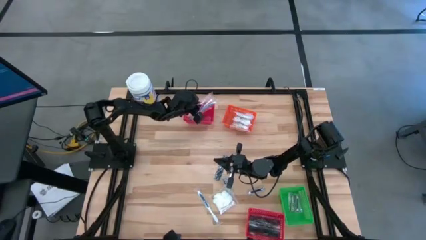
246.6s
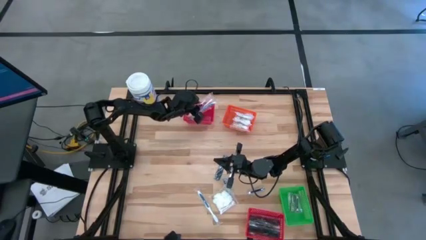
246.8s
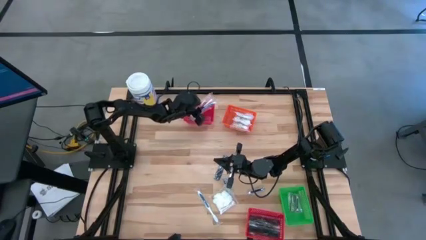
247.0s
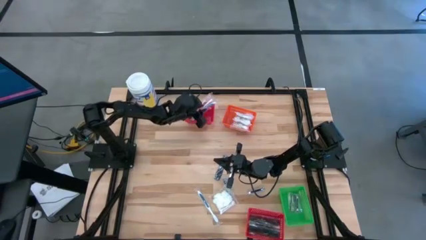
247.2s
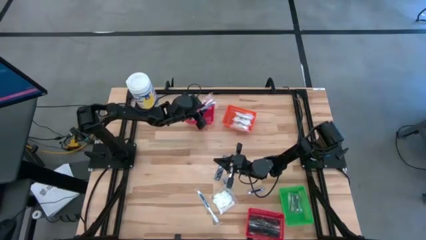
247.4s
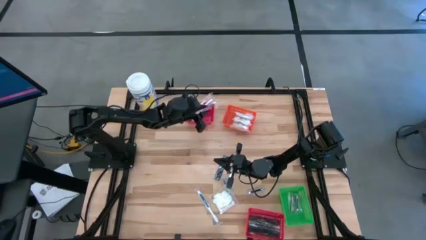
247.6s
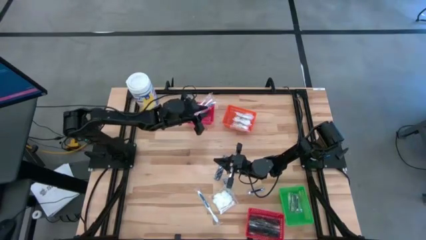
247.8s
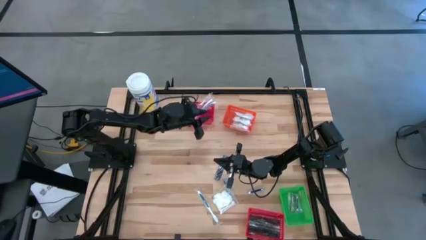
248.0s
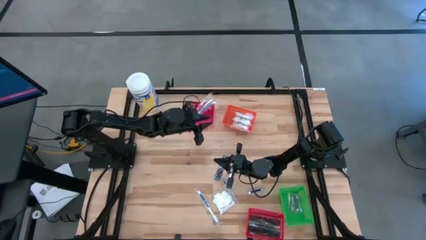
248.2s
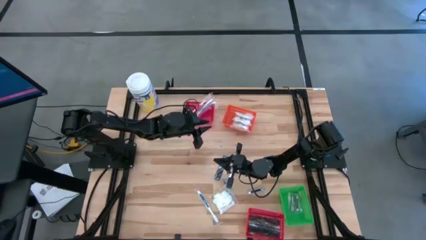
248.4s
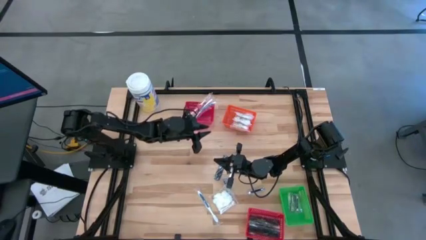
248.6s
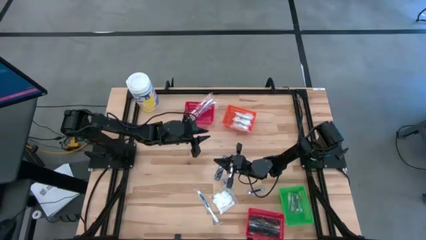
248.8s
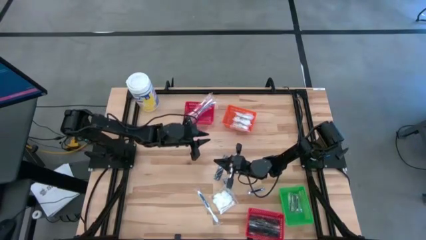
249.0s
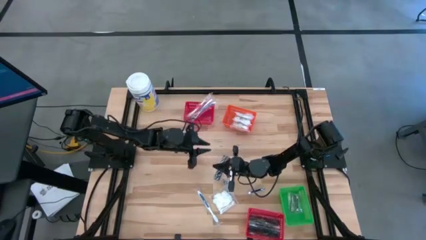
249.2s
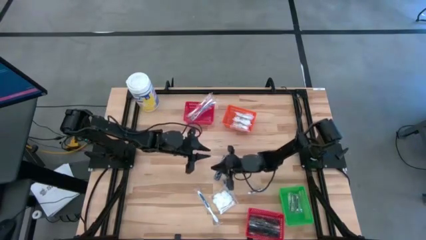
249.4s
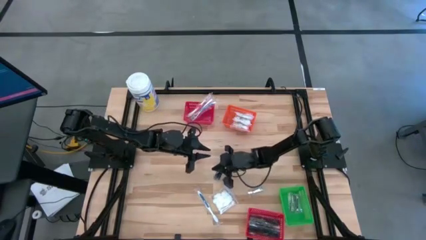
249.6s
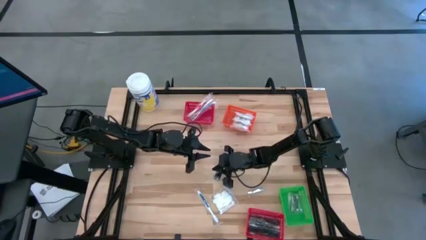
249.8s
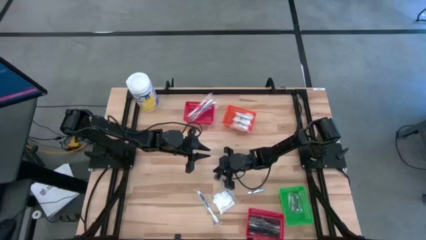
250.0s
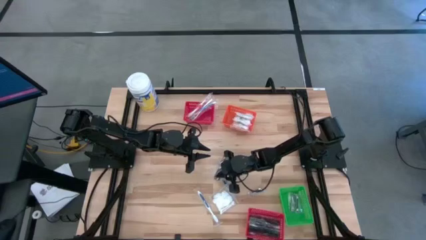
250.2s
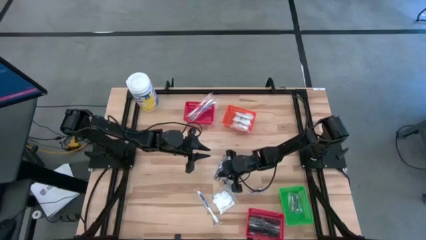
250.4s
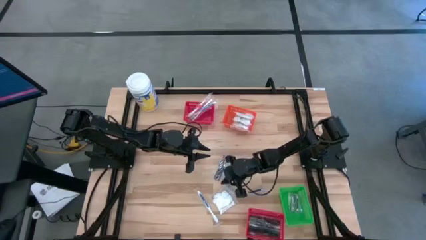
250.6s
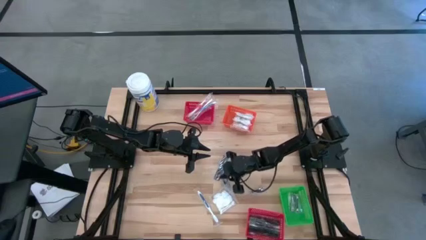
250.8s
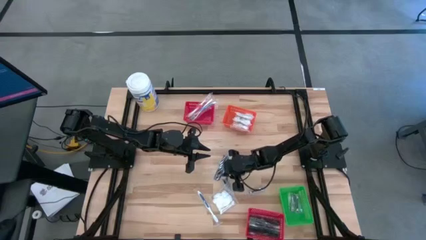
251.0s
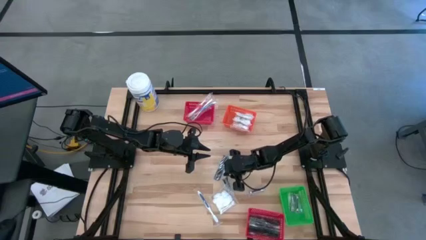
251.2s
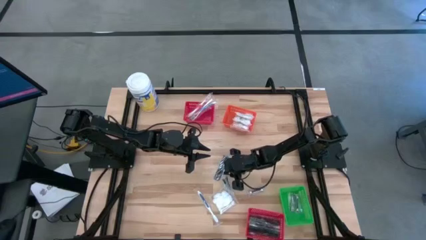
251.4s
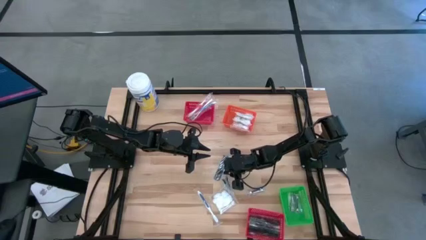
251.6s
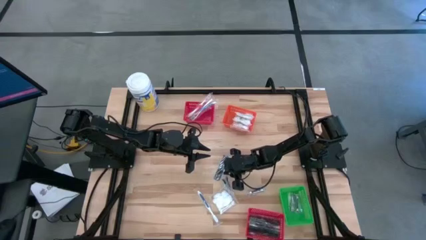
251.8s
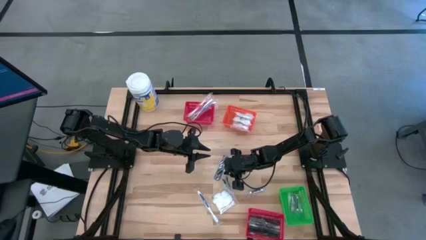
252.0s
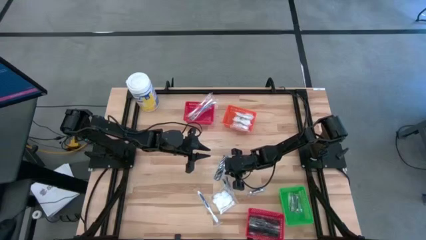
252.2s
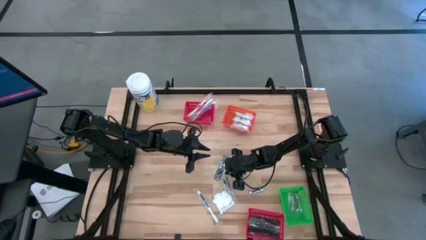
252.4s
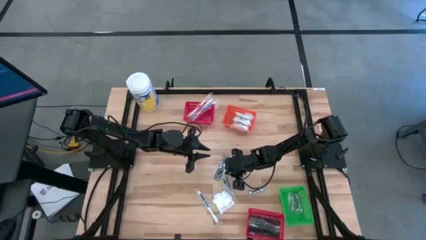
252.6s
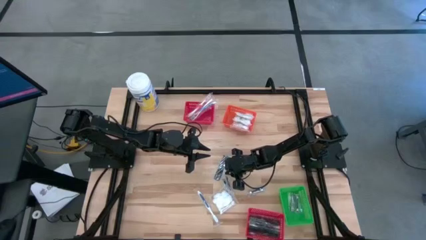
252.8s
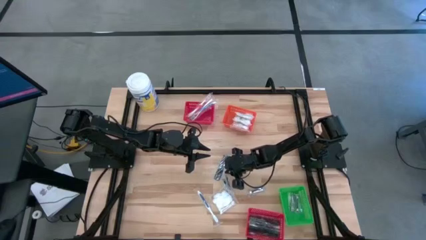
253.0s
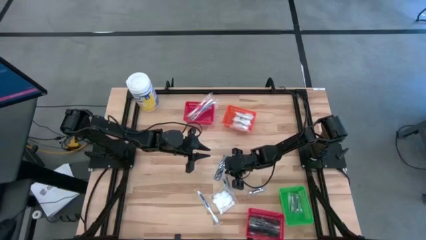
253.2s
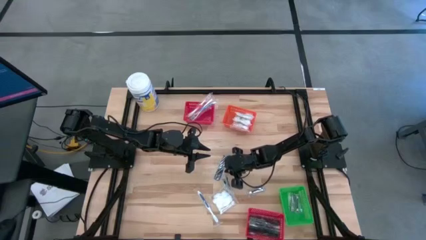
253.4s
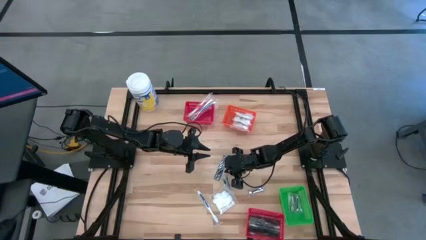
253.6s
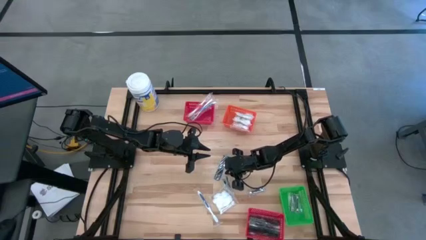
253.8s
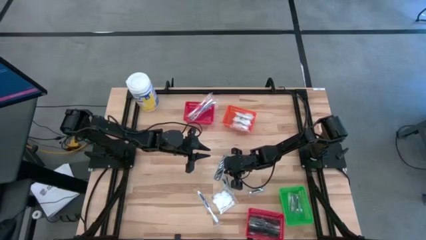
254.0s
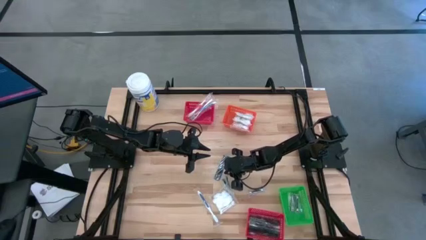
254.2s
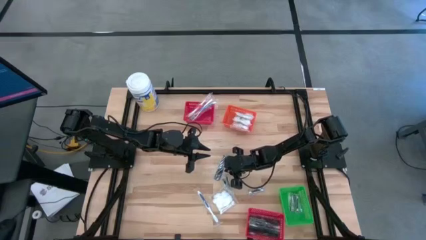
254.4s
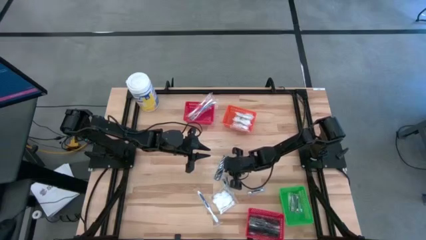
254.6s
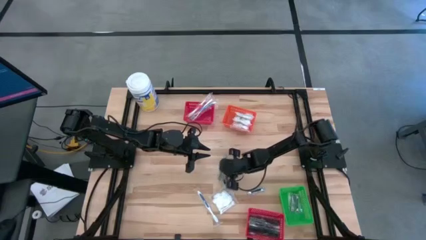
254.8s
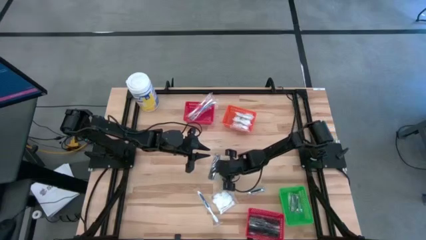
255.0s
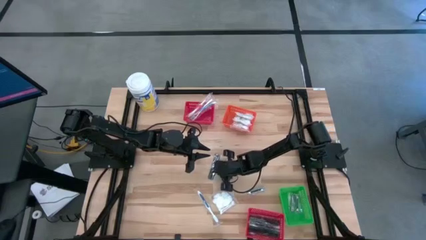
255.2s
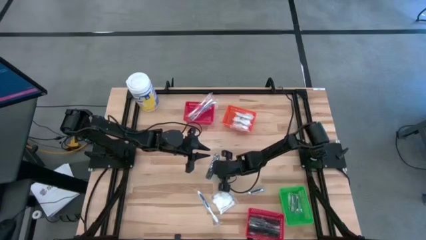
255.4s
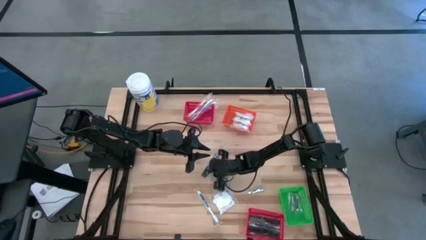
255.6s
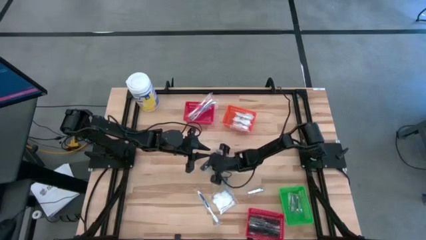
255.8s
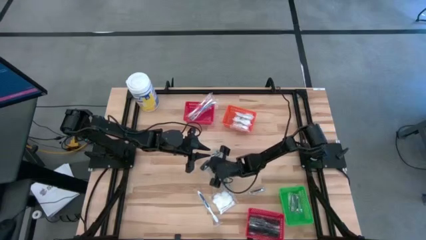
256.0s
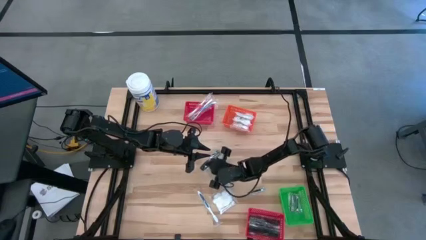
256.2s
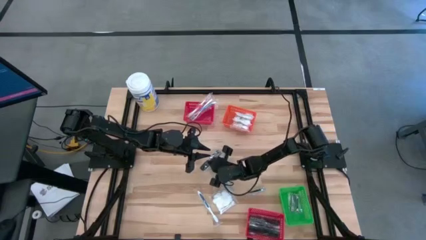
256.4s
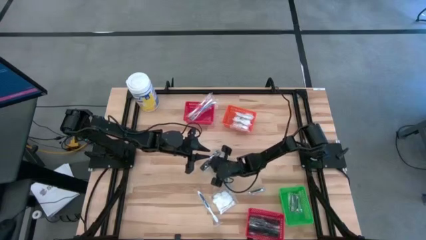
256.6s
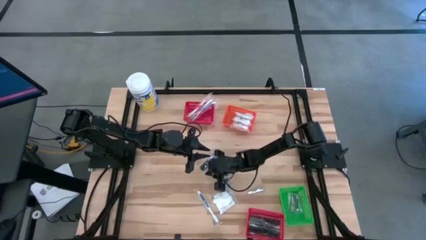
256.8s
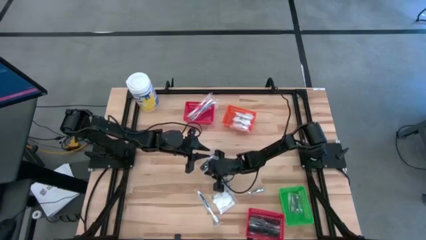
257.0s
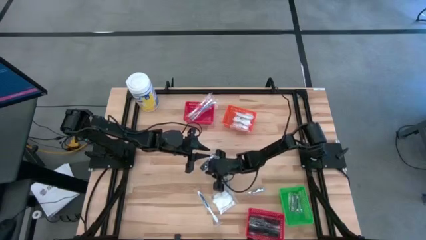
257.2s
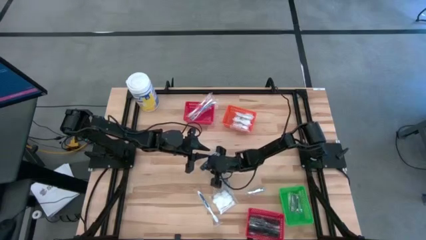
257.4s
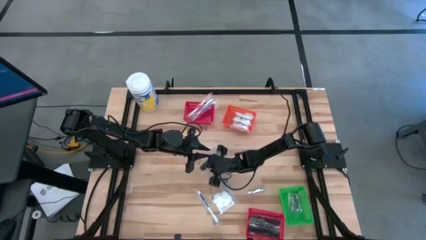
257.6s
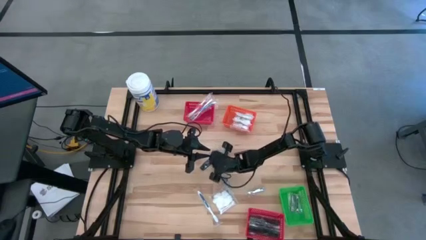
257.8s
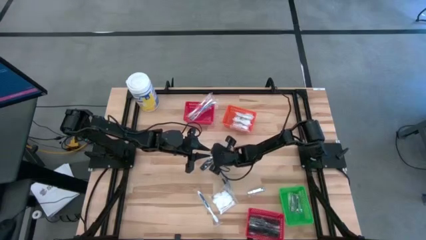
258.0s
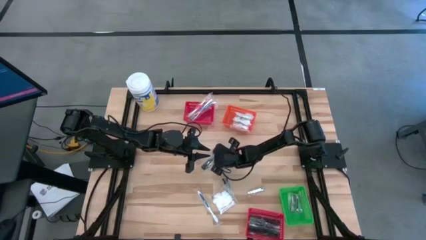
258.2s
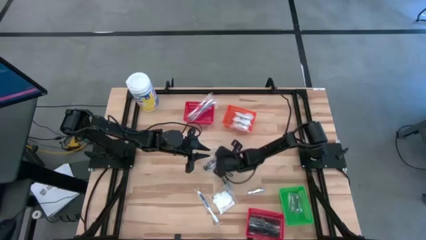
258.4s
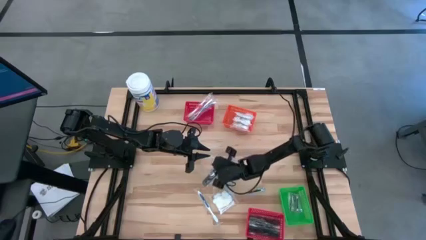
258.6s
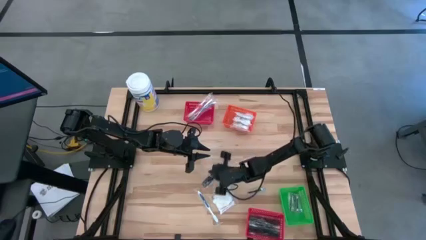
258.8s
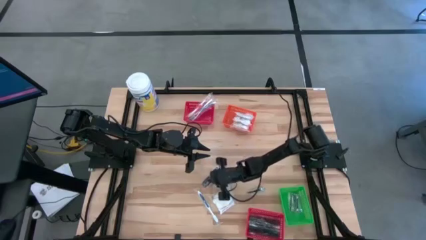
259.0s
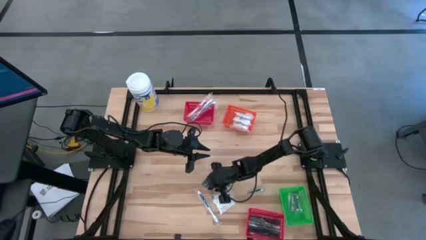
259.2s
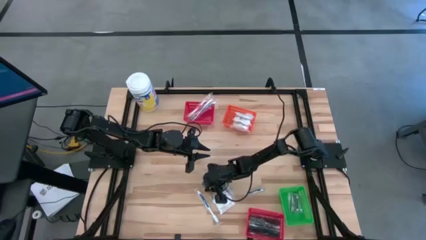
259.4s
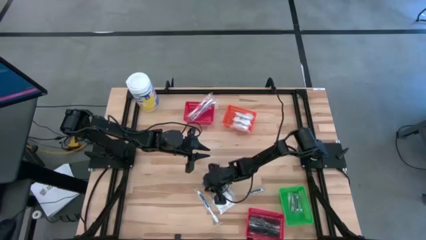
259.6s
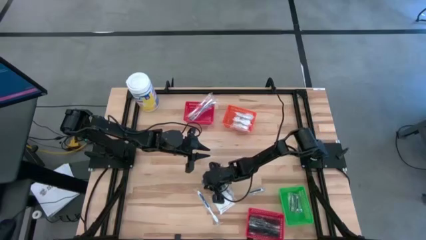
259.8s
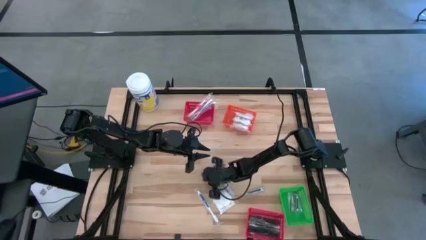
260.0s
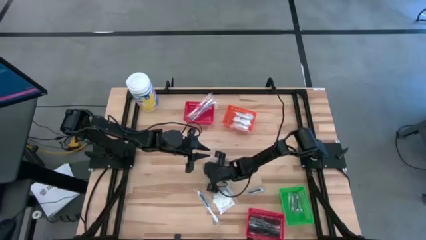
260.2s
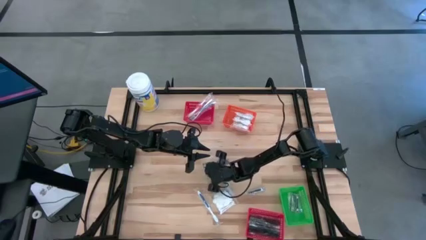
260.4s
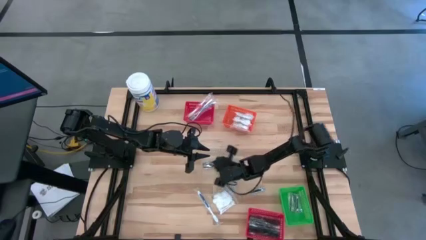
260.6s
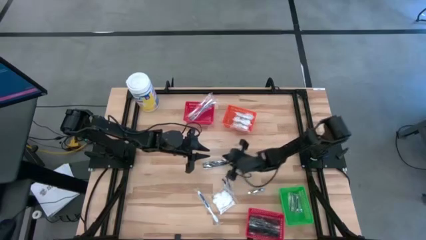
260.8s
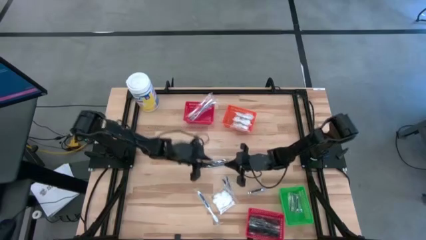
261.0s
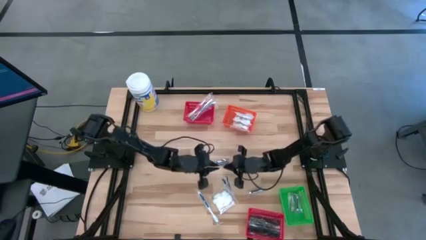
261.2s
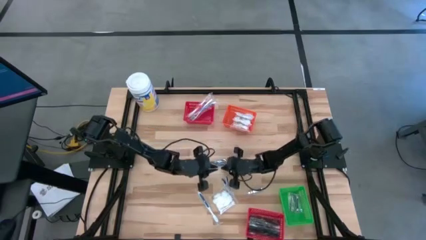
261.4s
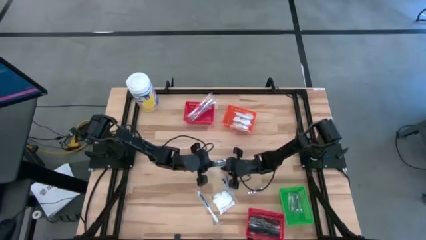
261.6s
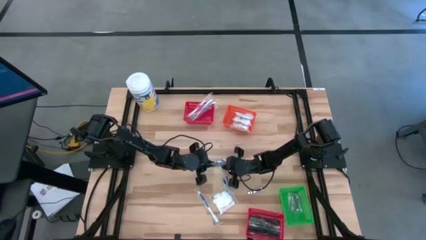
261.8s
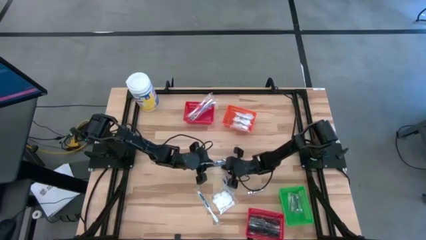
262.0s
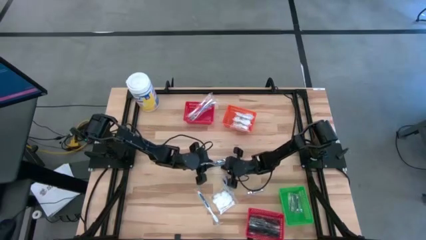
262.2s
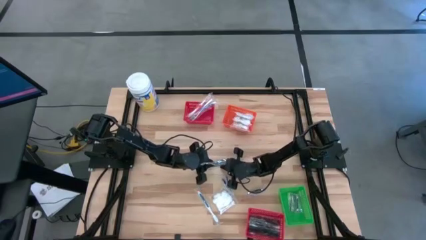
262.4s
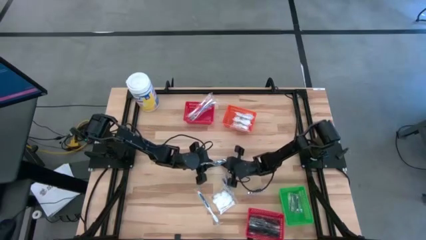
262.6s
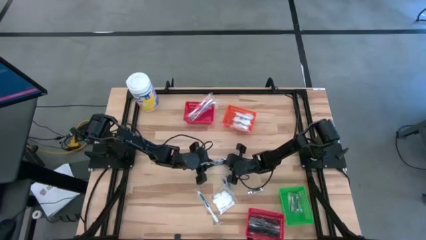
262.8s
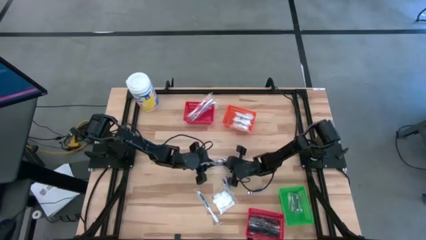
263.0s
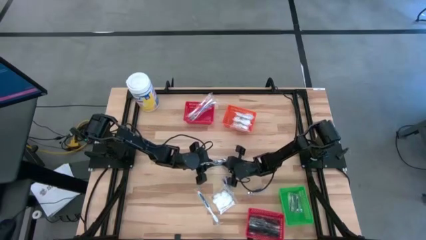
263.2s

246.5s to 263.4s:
Task: Pick & Place Travel size toiletries
Put the black comb into the bottom red bin
